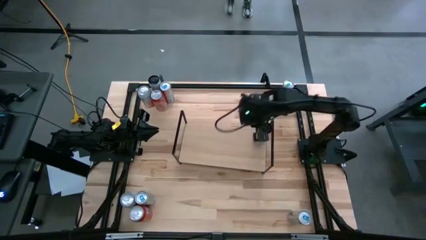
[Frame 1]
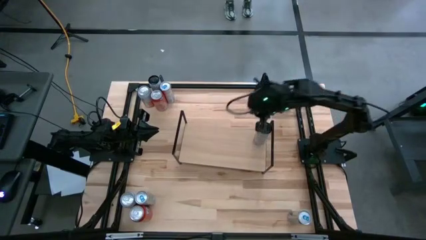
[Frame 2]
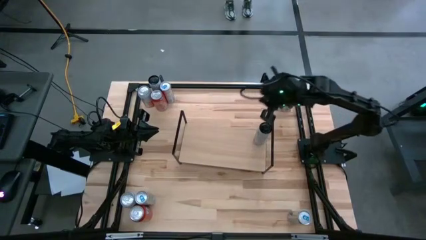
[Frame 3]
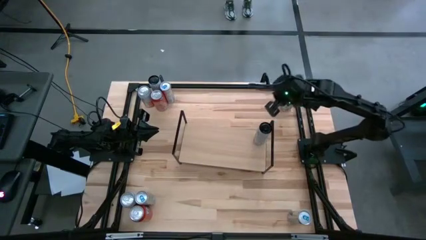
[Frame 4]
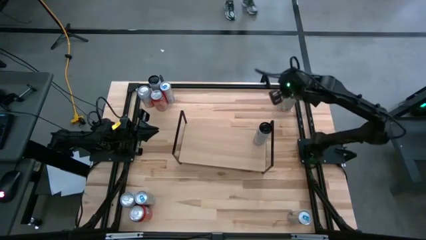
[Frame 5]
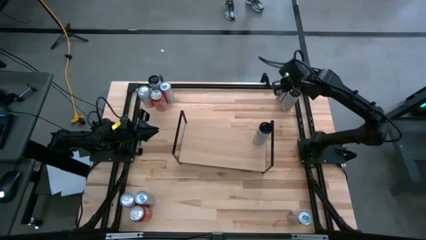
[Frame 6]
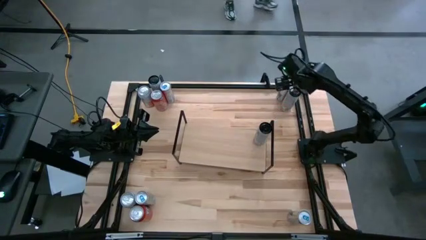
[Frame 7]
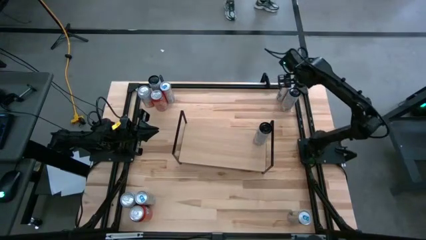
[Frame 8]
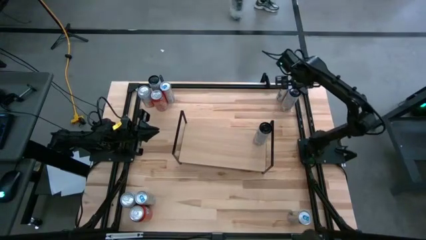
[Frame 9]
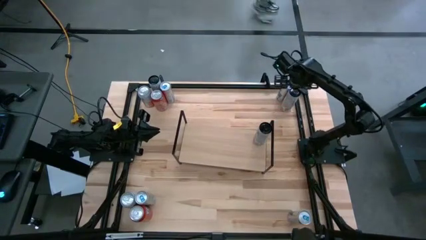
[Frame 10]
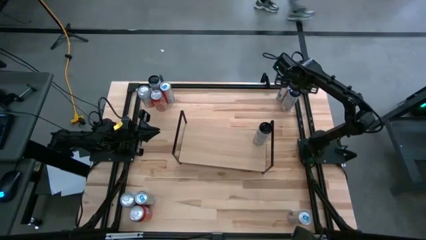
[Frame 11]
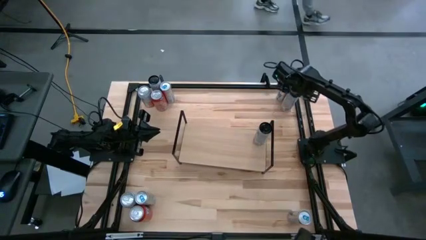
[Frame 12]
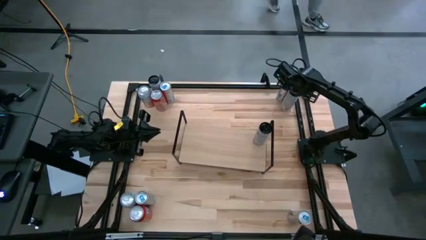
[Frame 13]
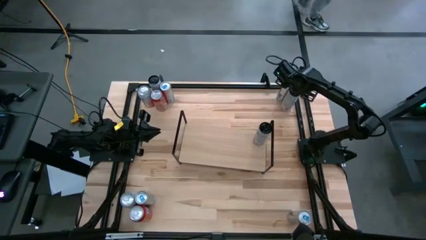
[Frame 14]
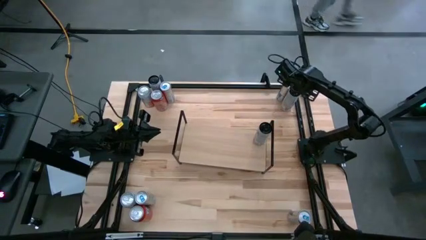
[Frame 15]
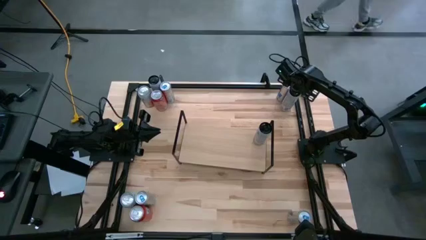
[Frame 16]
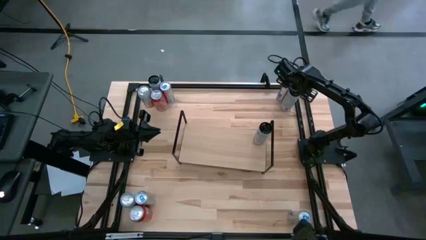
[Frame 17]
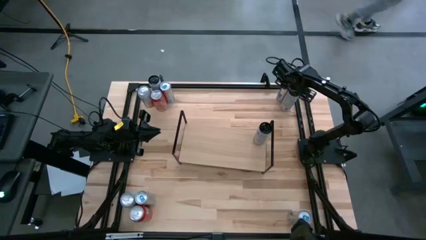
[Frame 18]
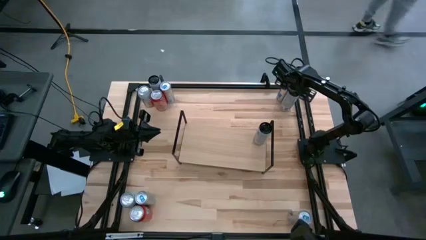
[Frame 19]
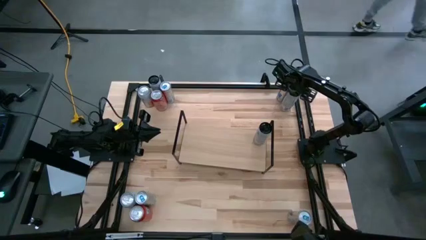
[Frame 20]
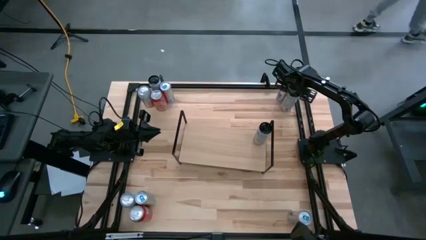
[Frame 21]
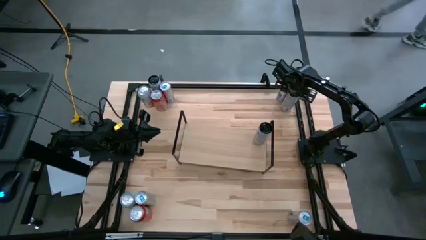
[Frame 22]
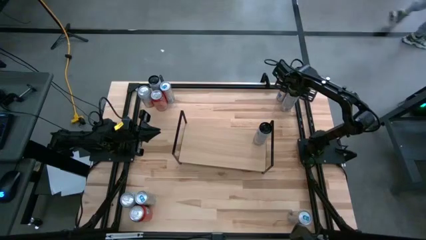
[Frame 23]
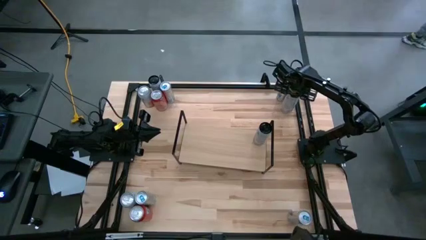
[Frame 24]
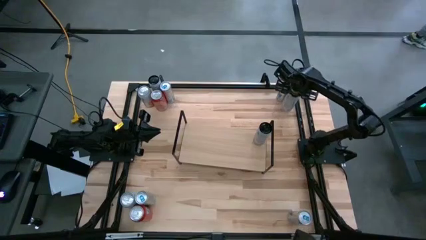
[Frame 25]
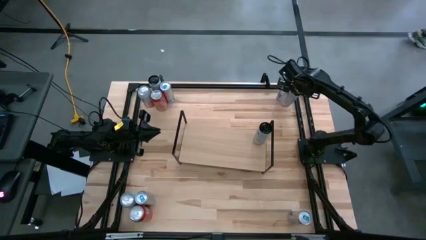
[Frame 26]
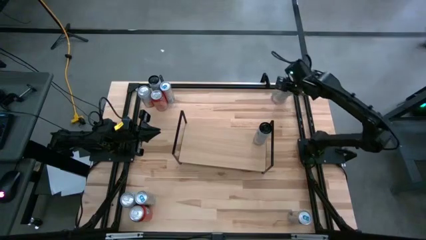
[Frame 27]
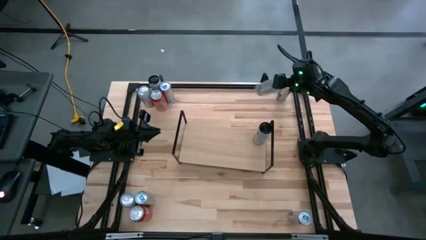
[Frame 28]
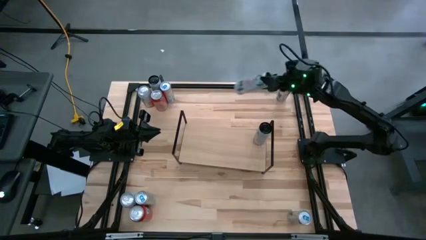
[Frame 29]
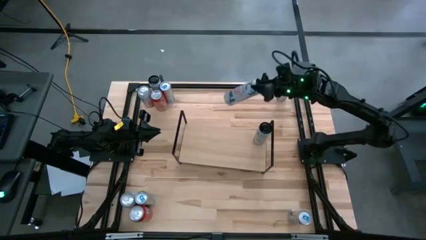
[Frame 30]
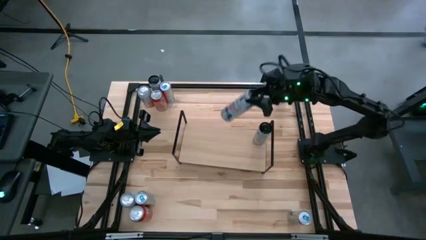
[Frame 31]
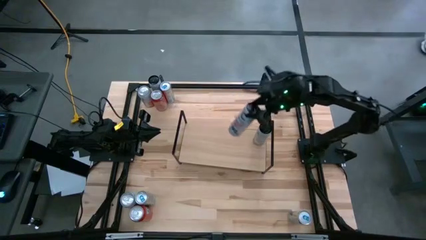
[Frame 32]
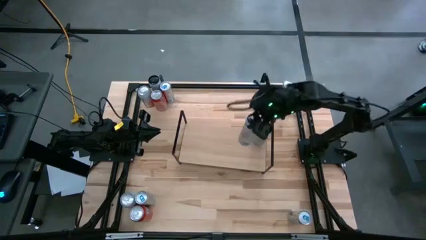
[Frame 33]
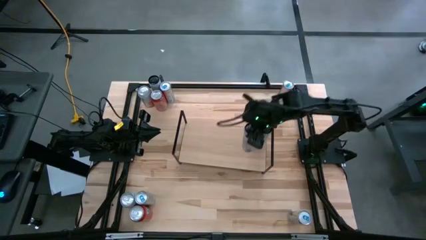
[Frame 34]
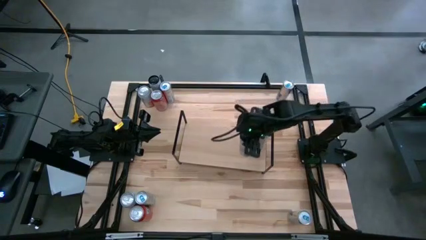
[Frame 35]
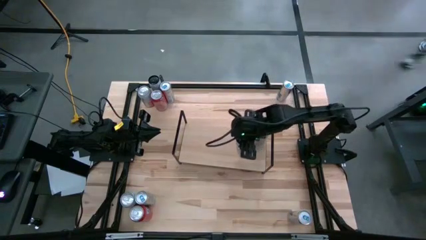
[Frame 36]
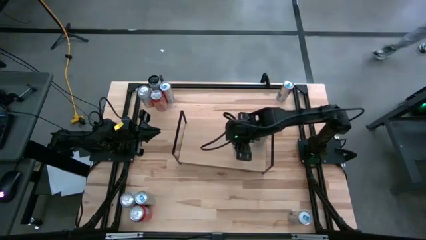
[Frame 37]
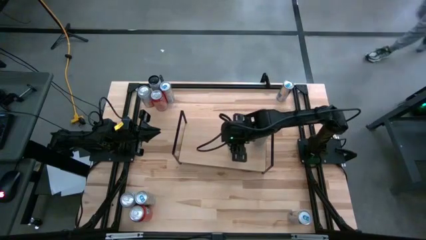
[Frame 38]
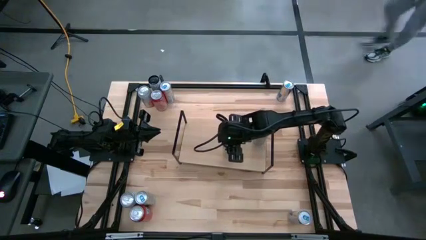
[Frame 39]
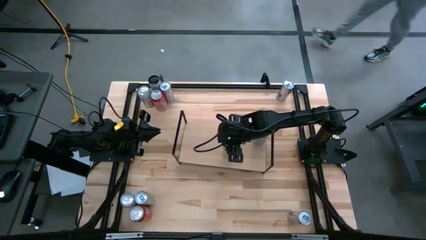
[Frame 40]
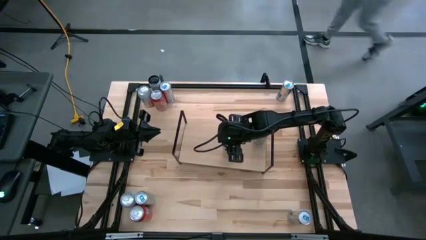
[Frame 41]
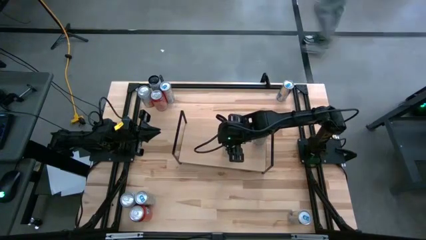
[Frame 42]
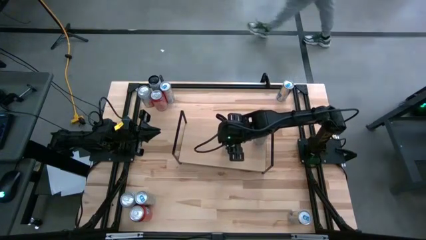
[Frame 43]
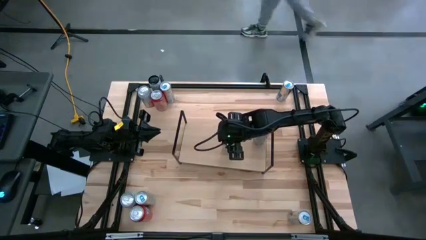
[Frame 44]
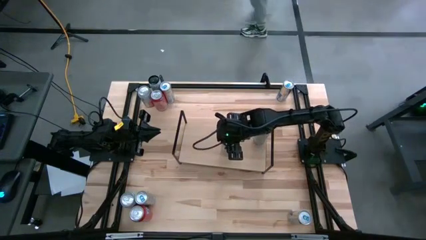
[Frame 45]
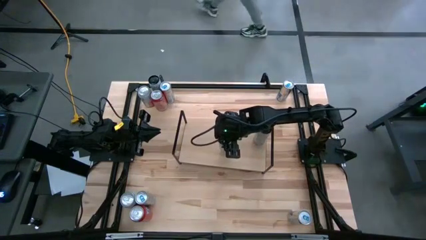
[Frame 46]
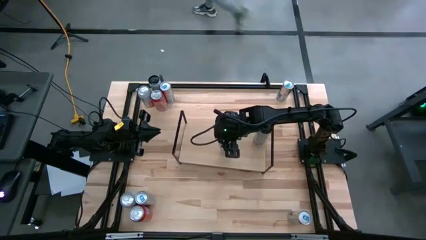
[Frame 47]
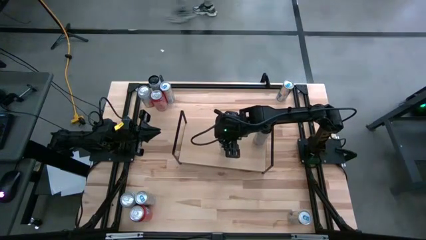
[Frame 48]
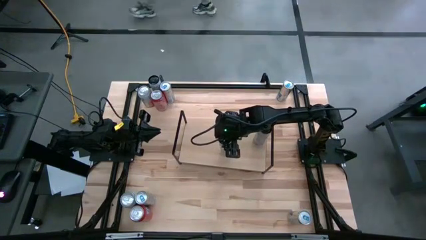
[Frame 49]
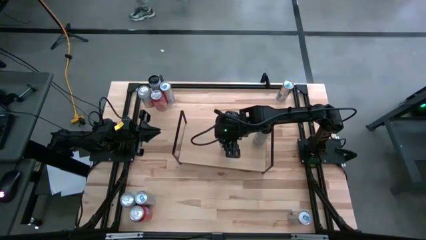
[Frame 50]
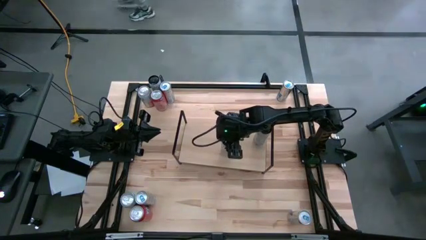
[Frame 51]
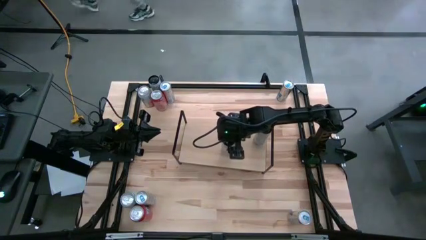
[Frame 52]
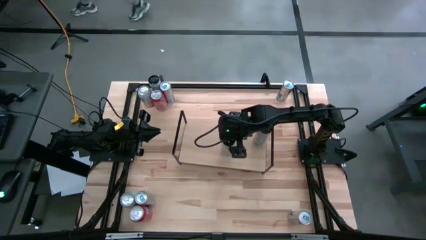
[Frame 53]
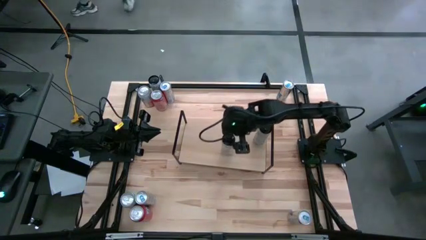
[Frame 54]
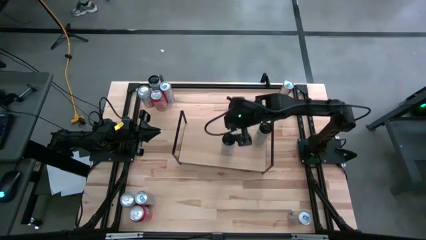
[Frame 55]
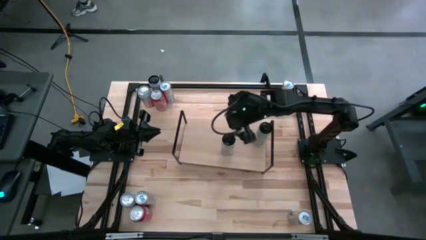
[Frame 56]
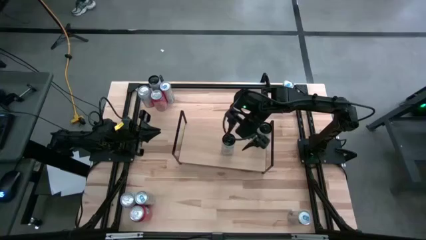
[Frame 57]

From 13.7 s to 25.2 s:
Task: Place canned beverage on shelf
Put the white soda can on the shelf aligned with the other white soda can

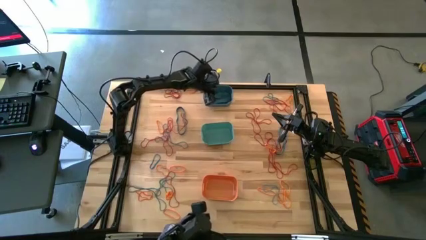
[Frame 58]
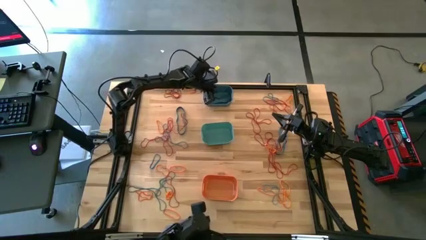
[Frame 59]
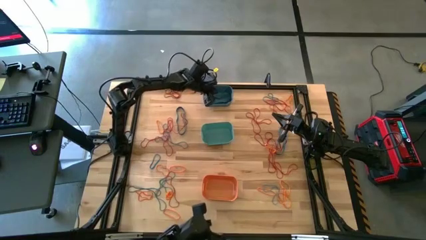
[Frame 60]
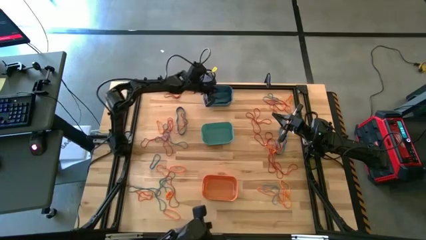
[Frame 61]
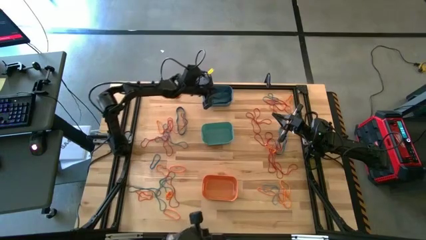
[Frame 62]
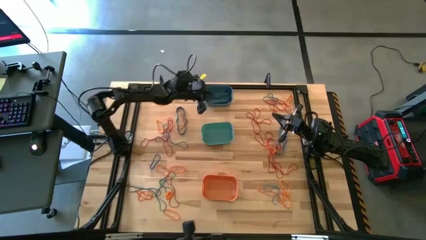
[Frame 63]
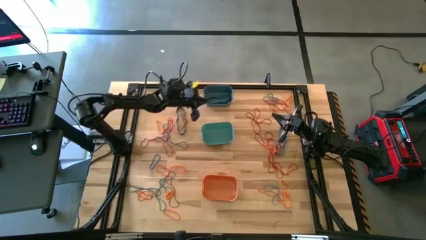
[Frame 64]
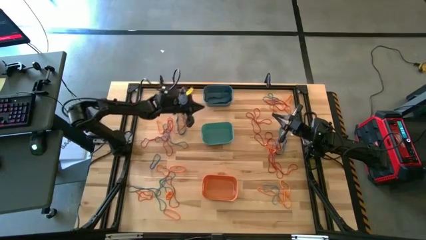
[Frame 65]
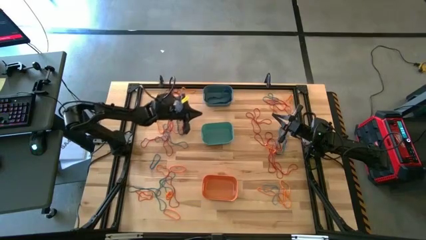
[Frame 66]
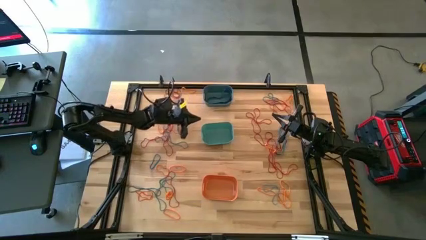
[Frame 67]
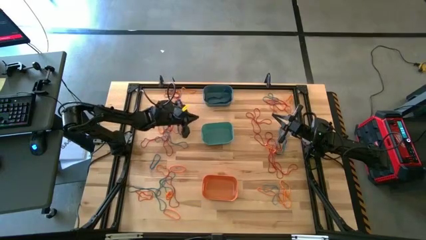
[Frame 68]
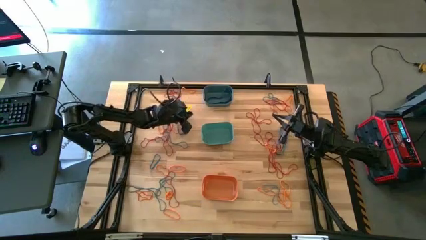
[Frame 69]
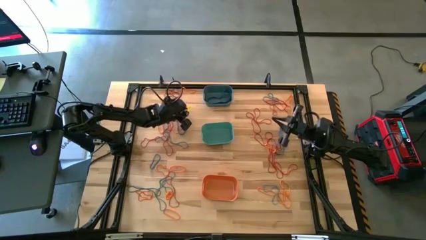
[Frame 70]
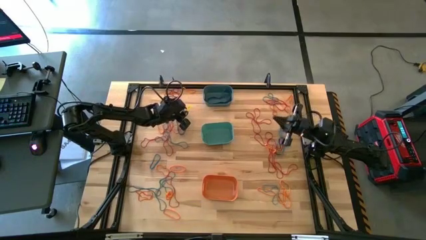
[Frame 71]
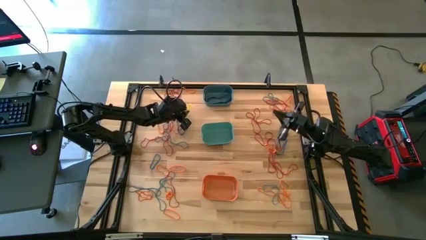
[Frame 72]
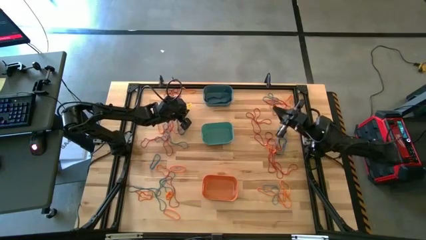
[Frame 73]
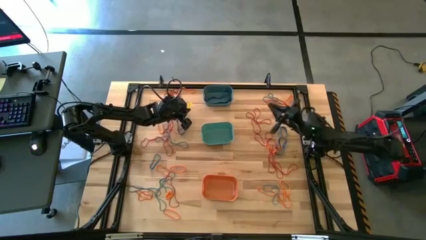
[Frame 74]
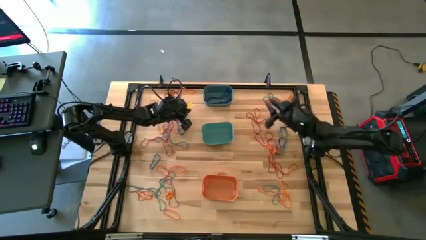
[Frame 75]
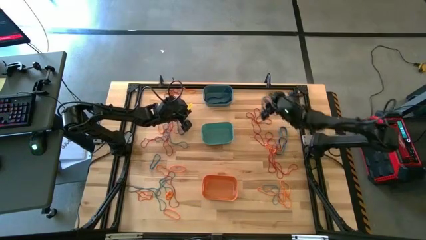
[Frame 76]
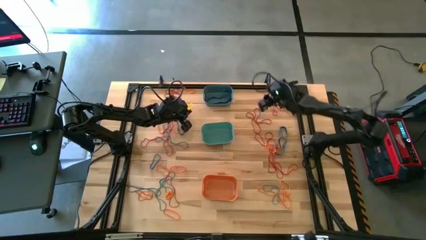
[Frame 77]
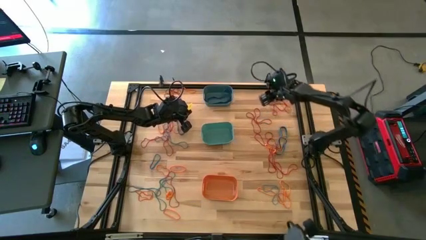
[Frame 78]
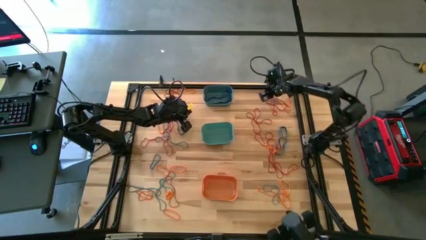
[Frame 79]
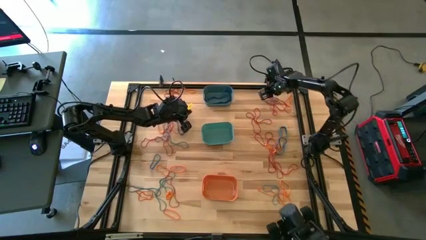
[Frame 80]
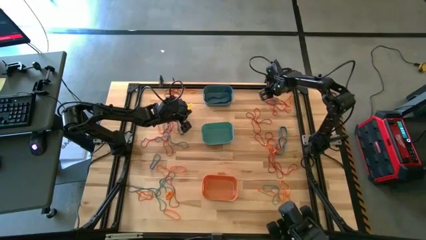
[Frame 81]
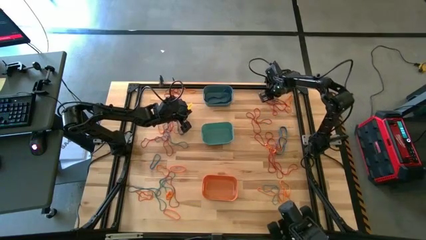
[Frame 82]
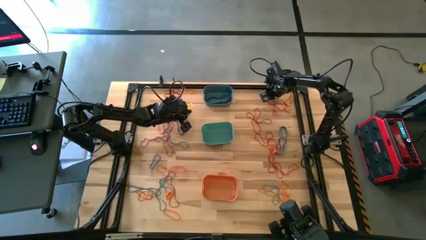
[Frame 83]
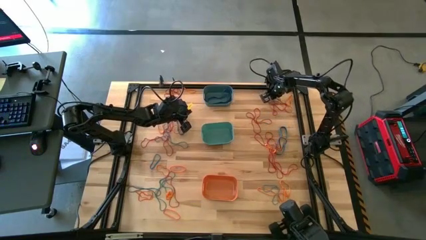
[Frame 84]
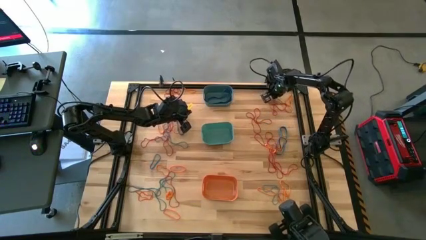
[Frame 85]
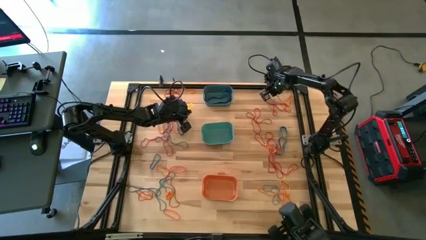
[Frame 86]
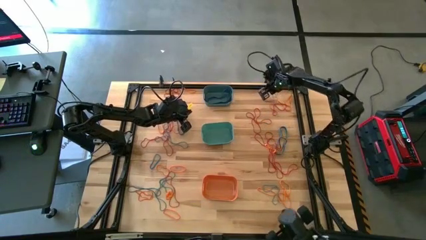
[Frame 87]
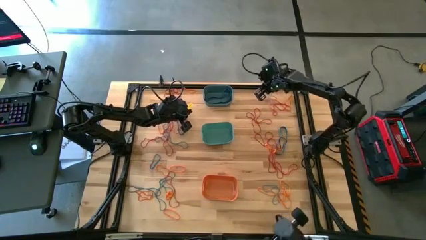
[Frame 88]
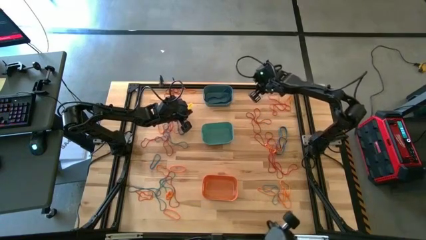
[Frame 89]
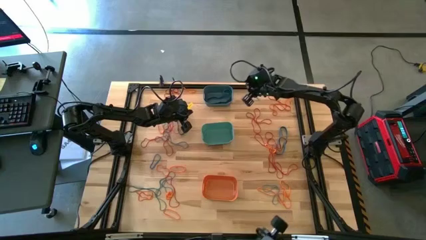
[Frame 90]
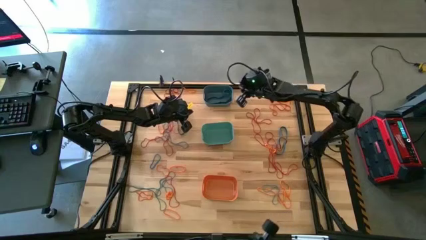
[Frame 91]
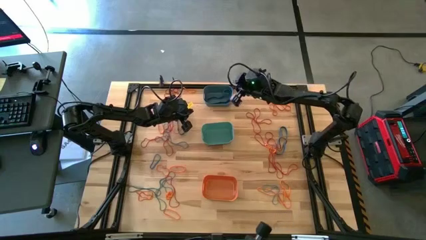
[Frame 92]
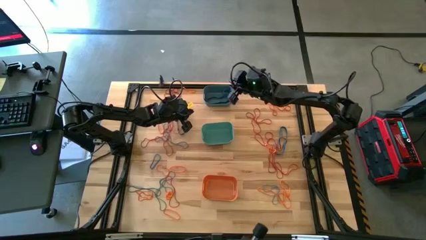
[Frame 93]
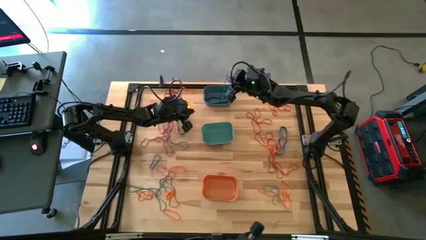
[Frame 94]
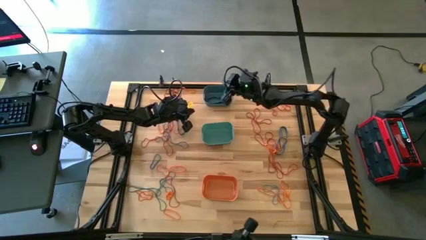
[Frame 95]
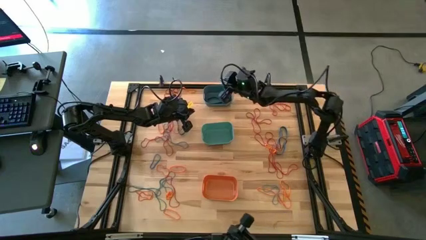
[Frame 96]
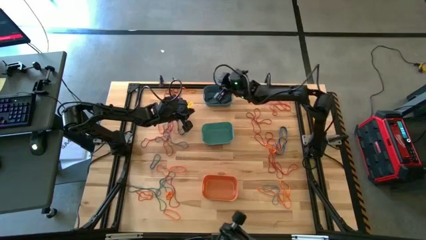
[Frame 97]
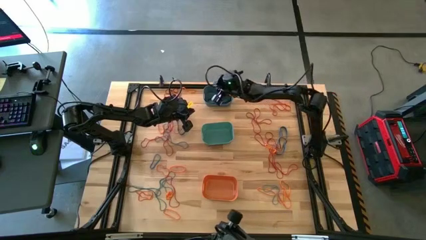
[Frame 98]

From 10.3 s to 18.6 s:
Task: Sort rubber bands into baskets
Put the blue rubber band into the blue bin
